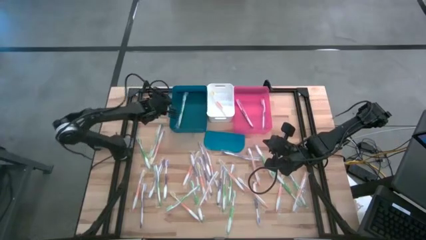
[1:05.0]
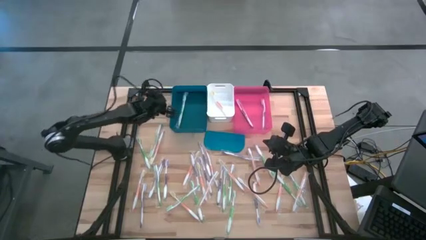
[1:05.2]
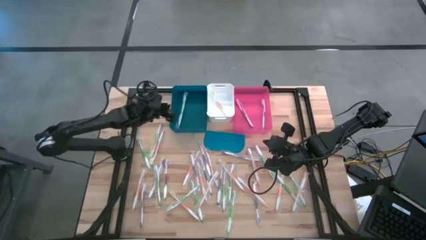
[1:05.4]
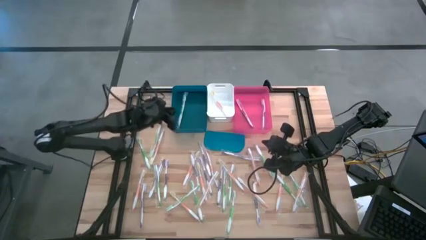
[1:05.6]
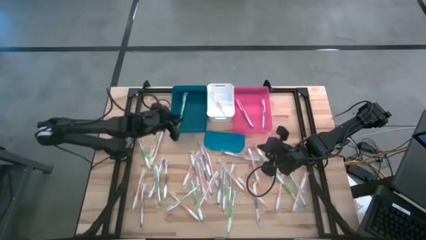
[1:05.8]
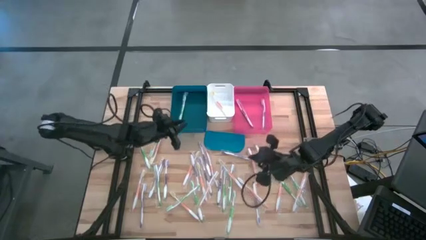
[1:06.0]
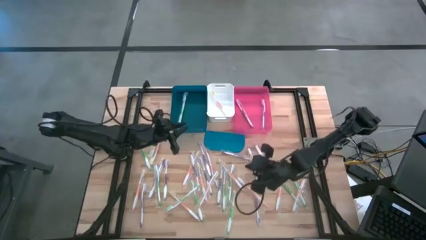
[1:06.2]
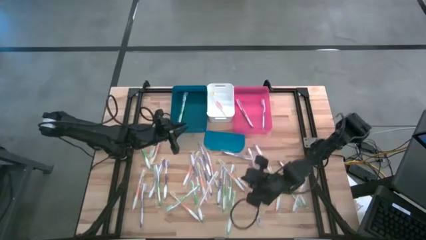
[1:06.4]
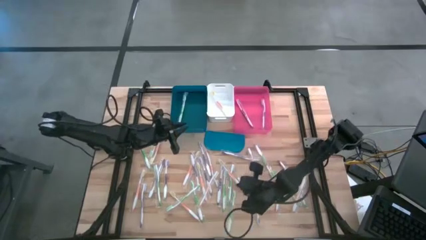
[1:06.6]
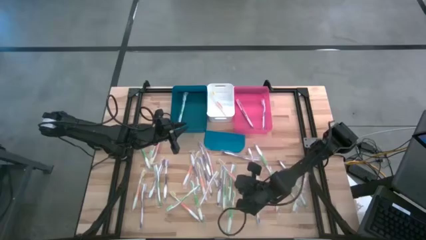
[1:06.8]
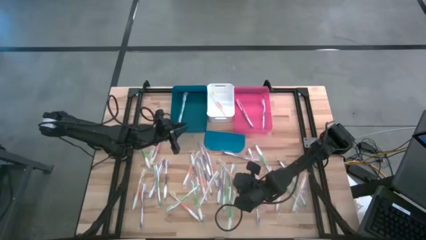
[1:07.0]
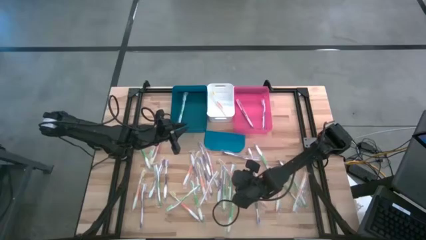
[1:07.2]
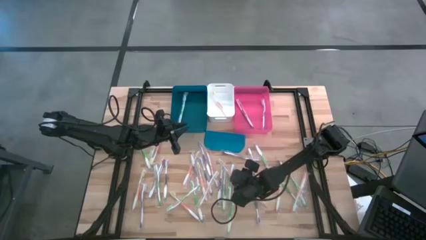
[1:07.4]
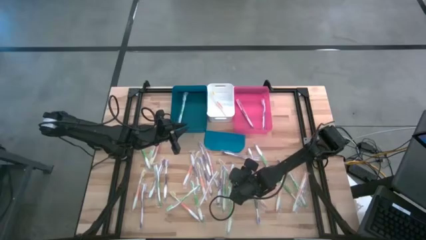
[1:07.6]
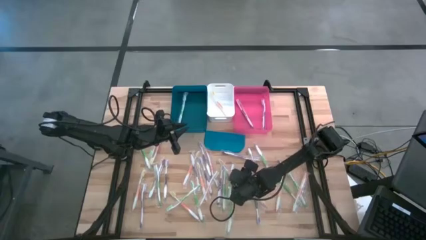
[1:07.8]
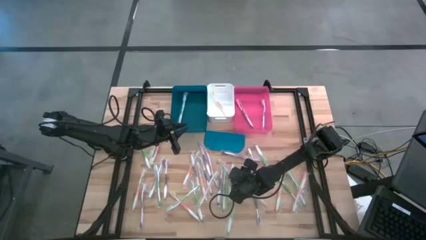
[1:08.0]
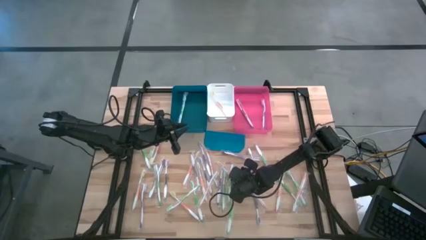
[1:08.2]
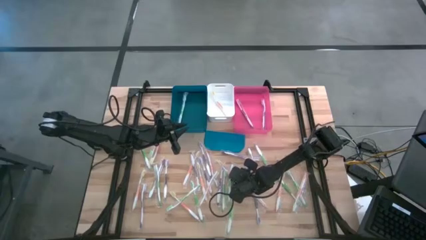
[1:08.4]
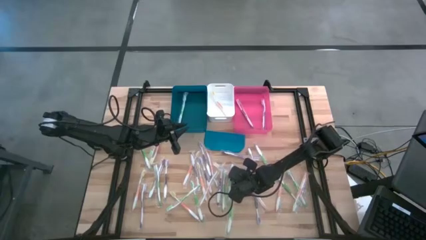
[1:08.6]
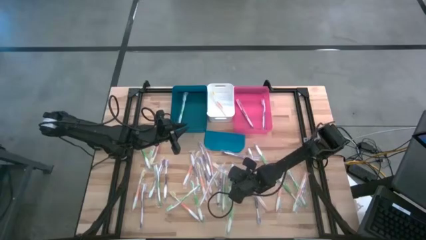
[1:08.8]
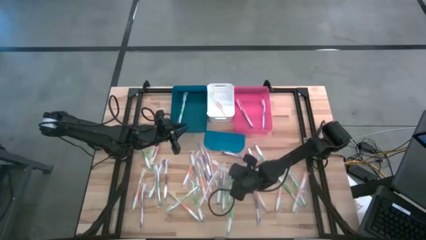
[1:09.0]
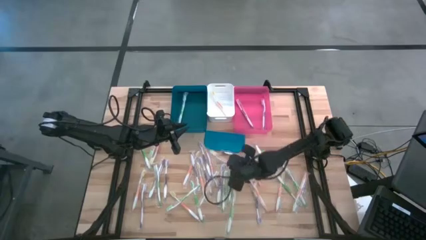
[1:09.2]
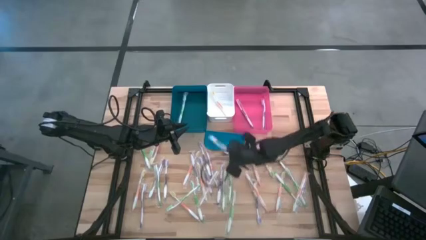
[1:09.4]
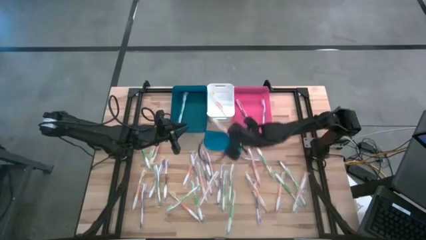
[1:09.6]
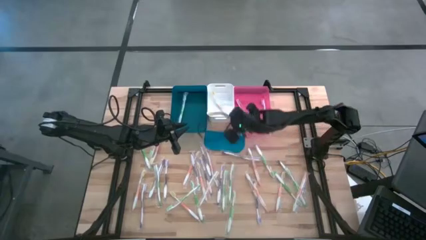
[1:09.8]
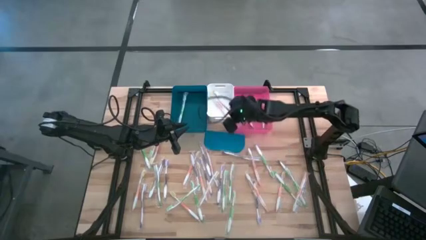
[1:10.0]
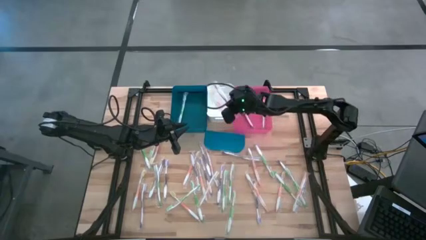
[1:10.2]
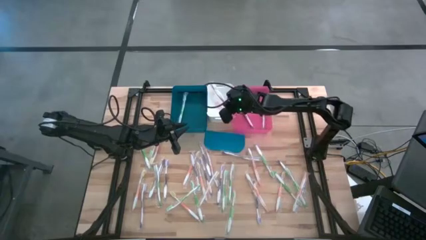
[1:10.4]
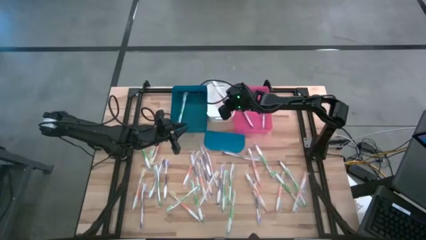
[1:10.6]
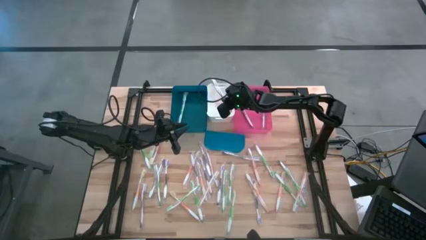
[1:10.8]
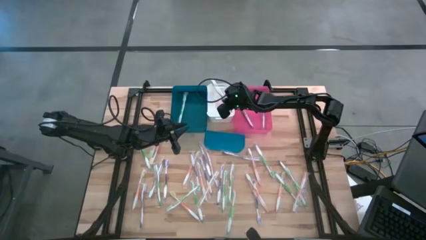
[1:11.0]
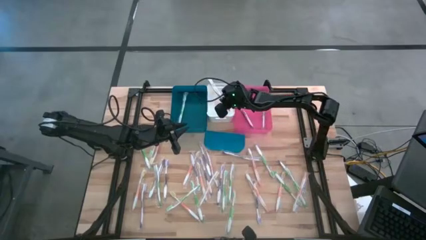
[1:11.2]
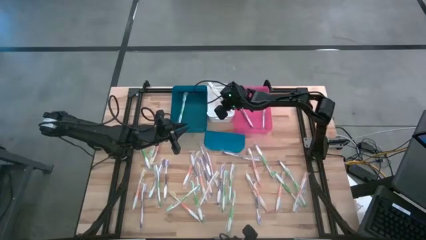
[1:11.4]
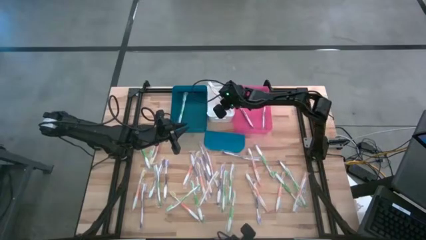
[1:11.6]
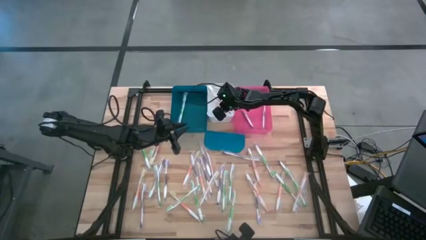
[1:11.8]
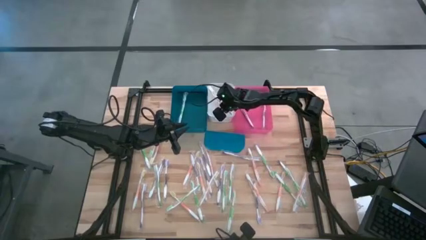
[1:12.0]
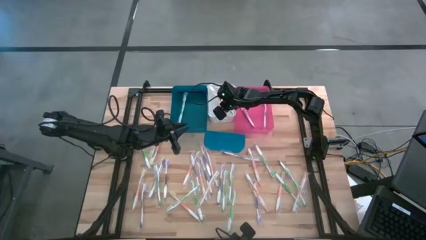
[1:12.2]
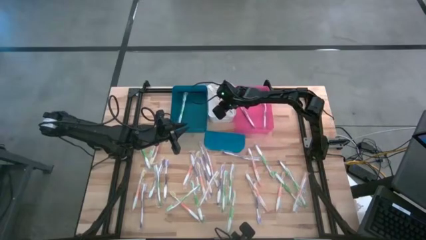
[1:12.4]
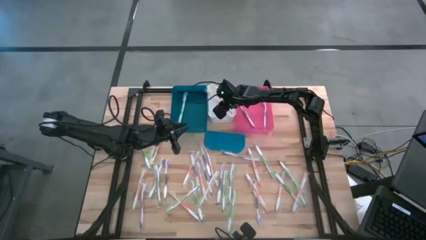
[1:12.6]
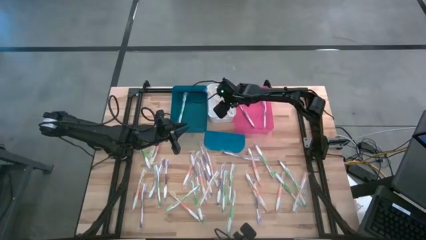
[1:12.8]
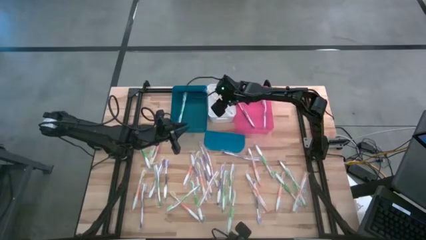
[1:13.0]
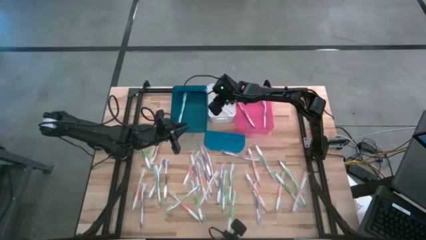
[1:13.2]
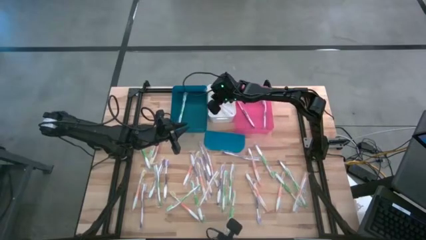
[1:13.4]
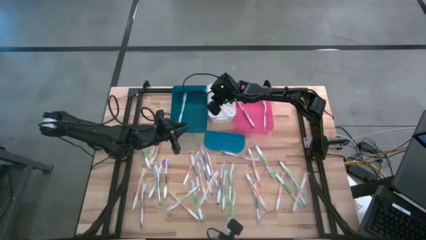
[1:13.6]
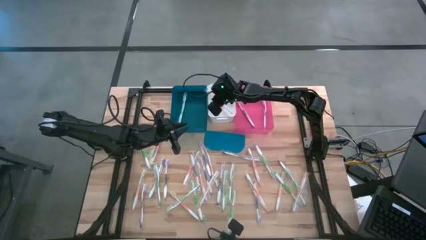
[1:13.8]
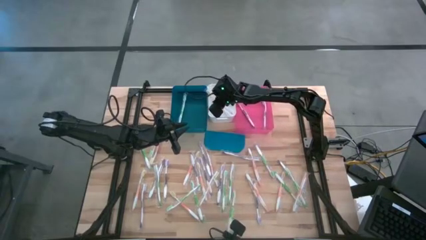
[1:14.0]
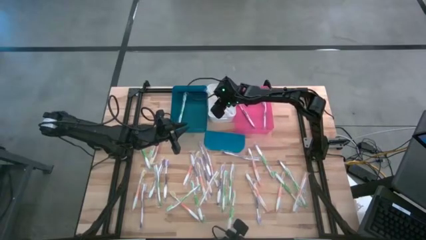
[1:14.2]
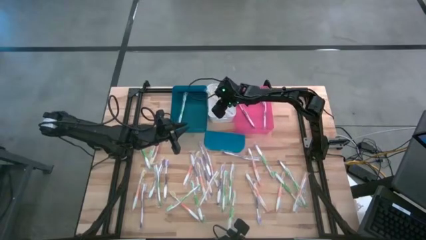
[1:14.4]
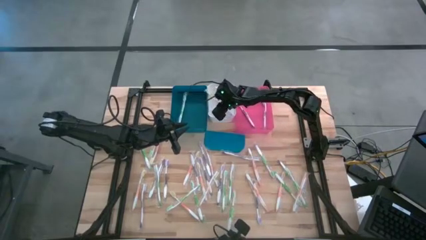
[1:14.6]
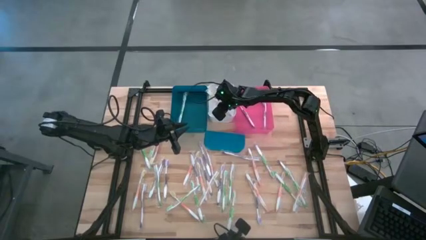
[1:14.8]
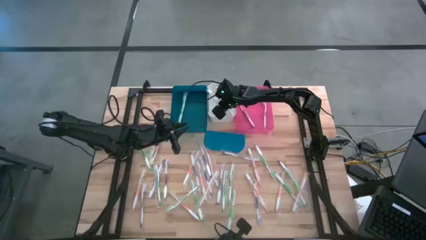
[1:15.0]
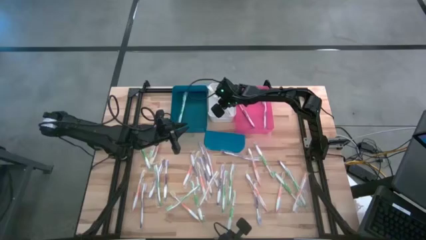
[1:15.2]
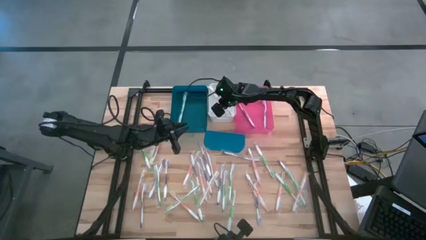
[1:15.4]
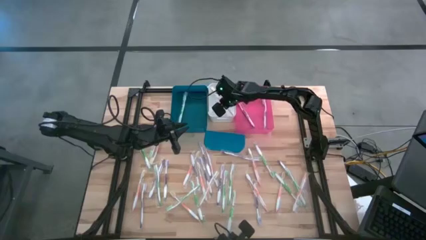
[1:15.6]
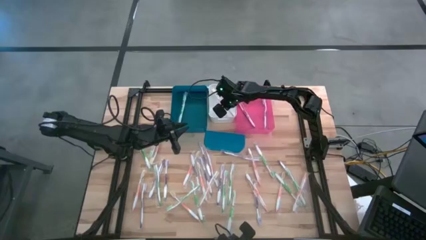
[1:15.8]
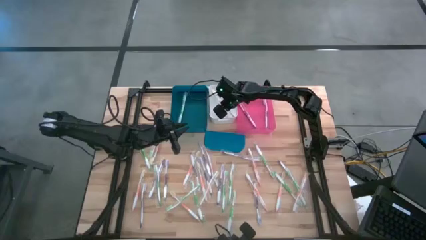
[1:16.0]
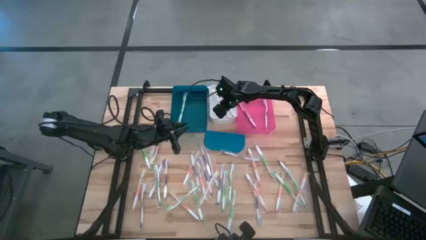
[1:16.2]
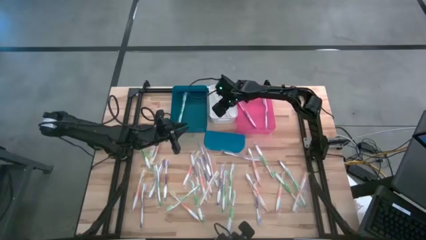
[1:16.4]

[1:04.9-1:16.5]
Task: Pick & Place Toothbrushes
Put the orange toothbrush into the white bin

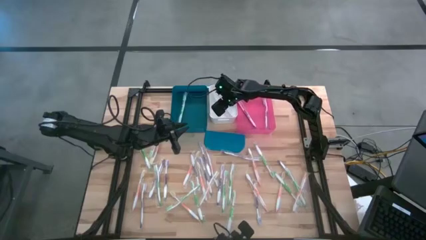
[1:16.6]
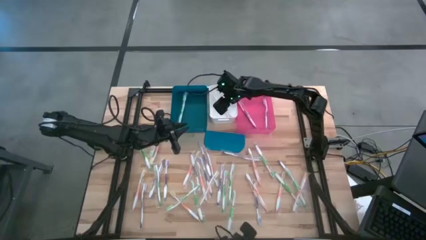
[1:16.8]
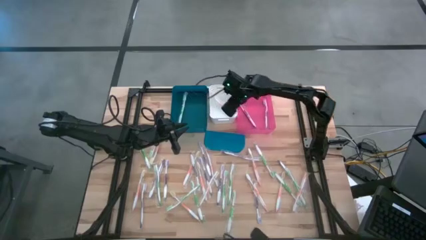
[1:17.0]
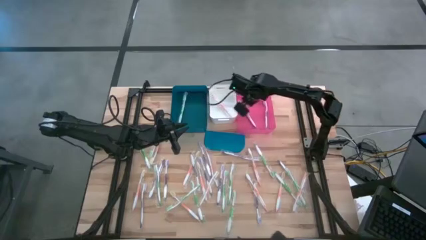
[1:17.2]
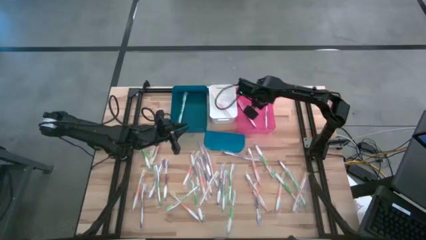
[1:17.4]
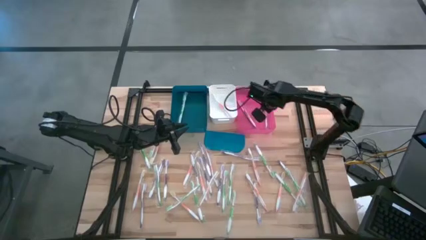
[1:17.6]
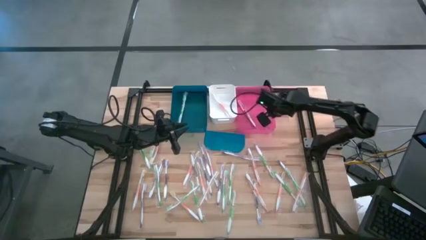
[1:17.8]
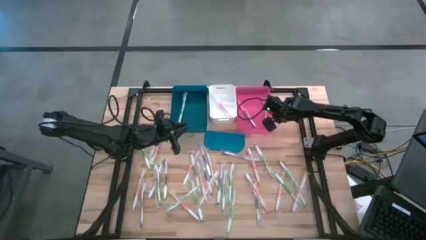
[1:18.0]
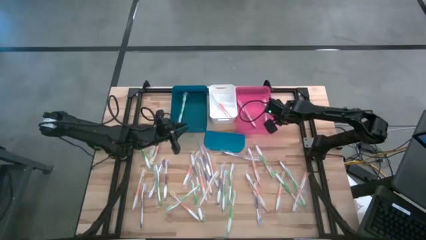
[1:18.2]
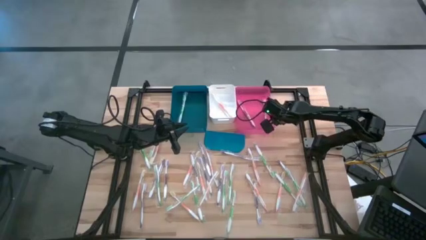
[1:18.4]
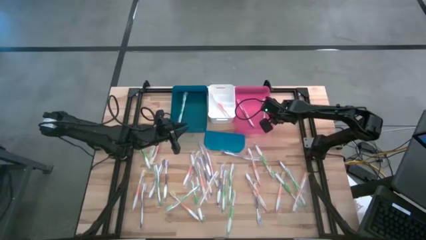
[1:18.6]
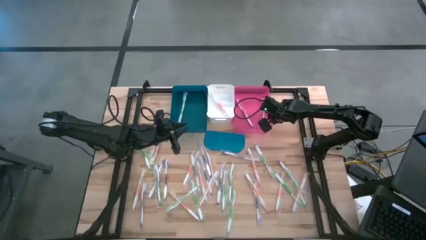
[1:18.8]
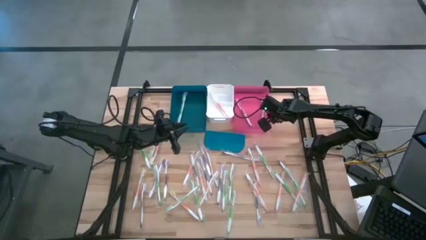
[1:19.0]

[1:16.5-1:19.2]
Adjust the pink bin on the table
